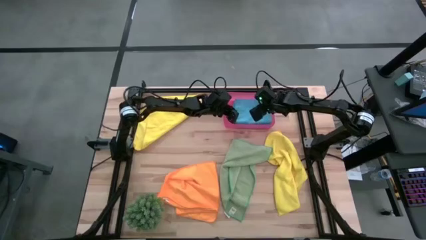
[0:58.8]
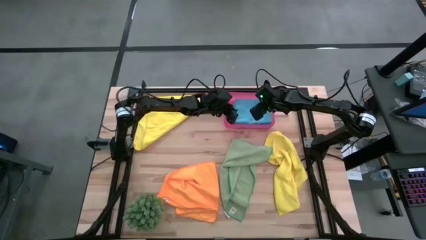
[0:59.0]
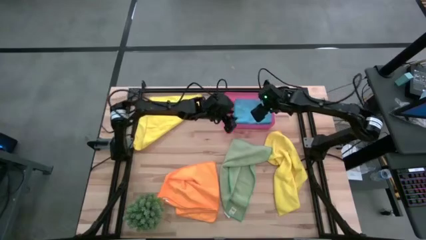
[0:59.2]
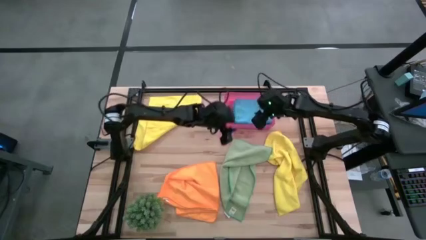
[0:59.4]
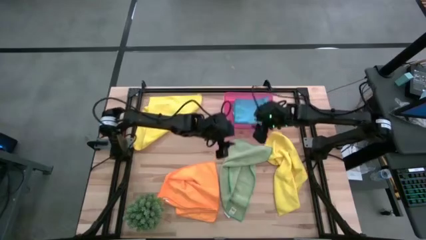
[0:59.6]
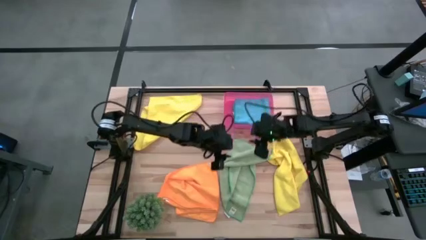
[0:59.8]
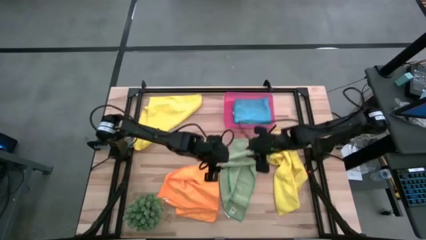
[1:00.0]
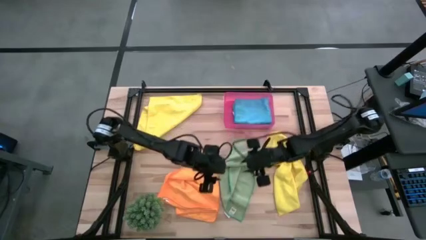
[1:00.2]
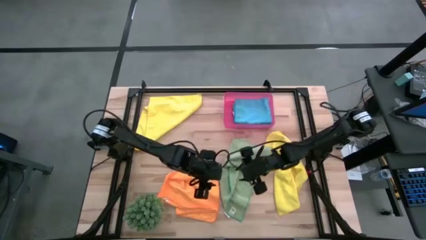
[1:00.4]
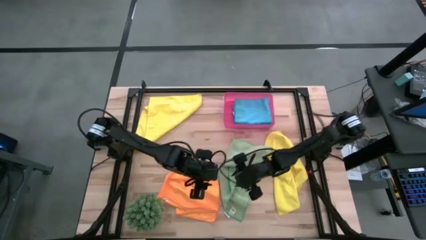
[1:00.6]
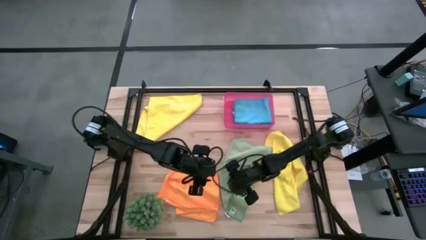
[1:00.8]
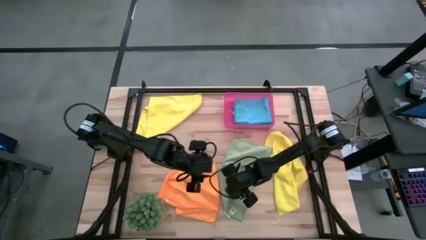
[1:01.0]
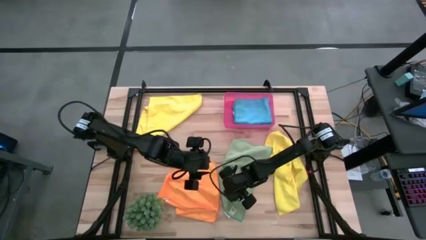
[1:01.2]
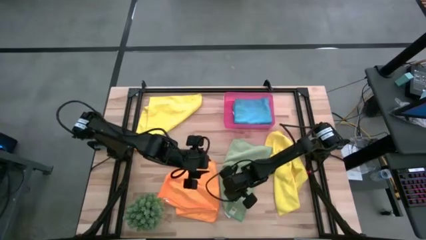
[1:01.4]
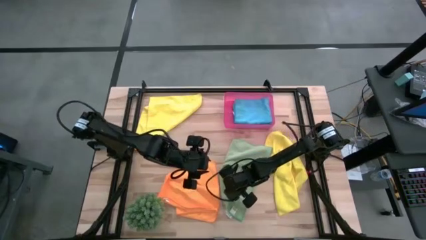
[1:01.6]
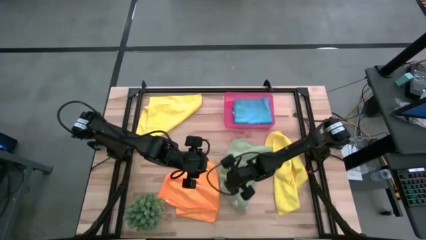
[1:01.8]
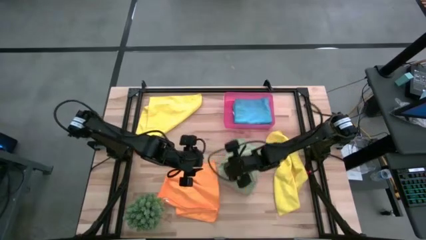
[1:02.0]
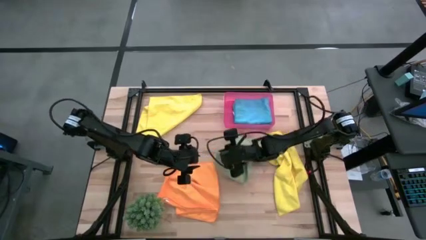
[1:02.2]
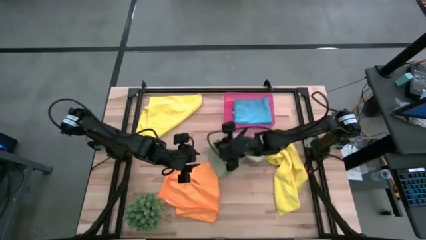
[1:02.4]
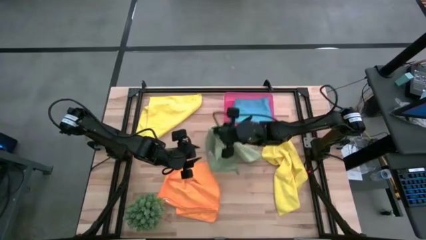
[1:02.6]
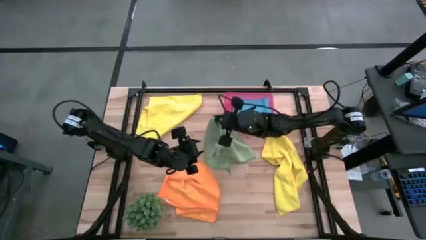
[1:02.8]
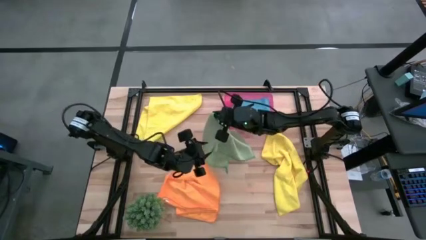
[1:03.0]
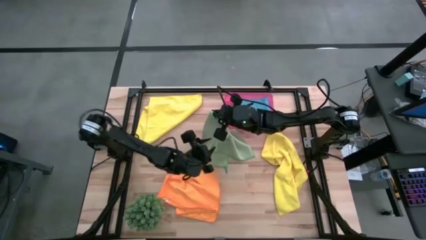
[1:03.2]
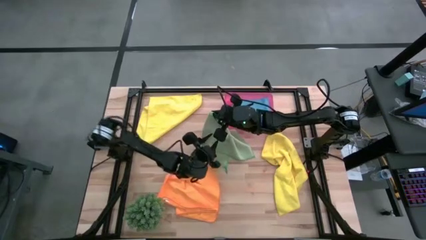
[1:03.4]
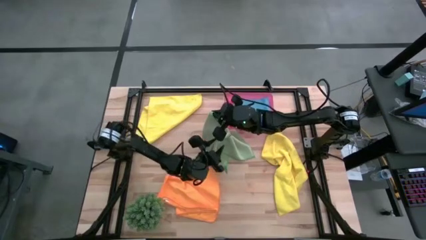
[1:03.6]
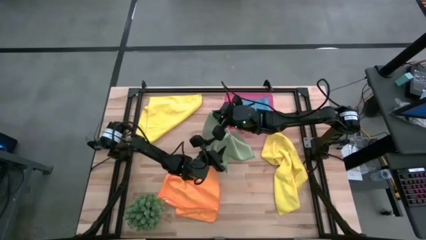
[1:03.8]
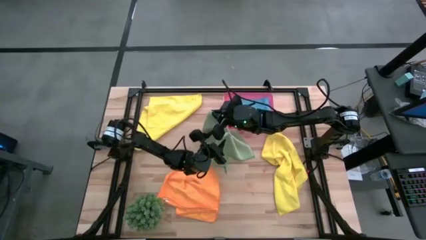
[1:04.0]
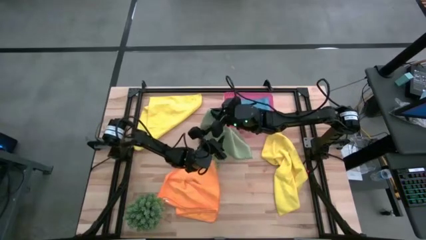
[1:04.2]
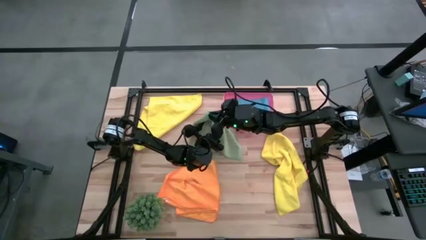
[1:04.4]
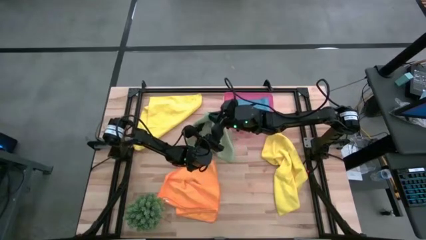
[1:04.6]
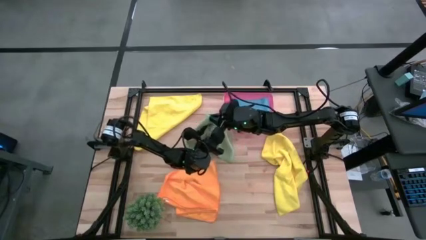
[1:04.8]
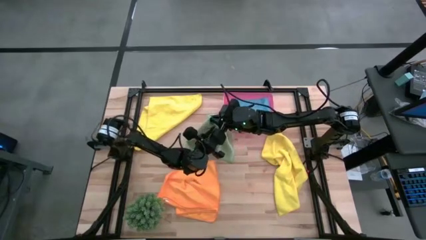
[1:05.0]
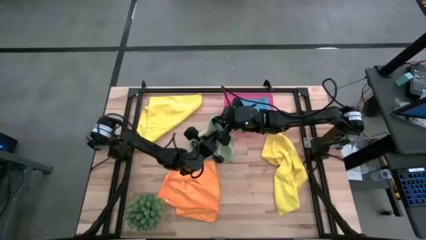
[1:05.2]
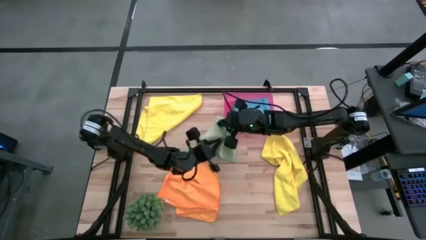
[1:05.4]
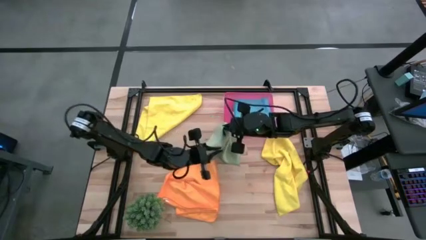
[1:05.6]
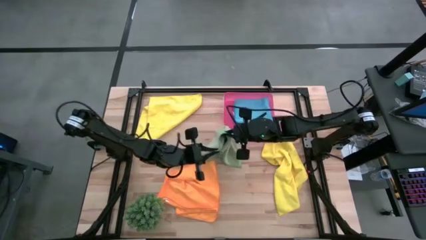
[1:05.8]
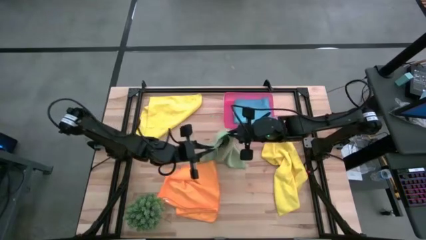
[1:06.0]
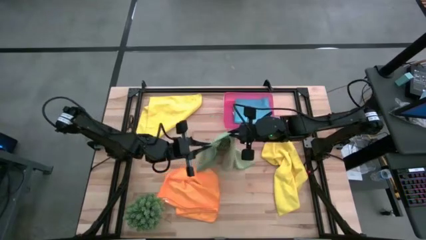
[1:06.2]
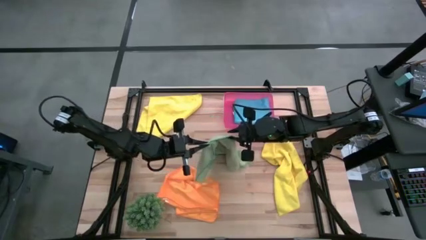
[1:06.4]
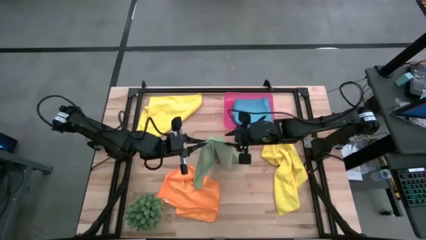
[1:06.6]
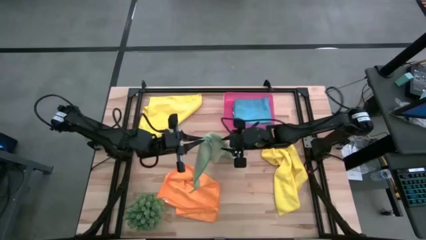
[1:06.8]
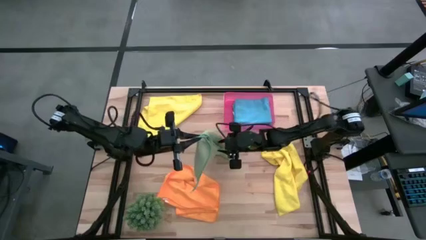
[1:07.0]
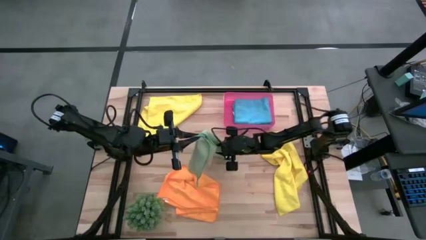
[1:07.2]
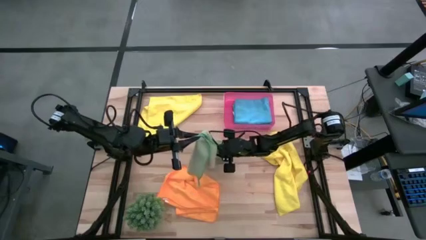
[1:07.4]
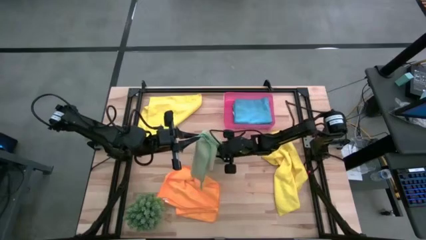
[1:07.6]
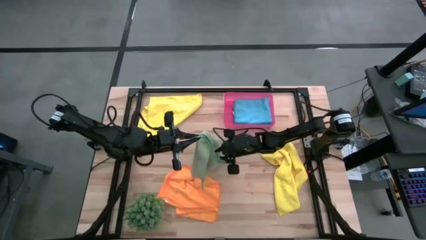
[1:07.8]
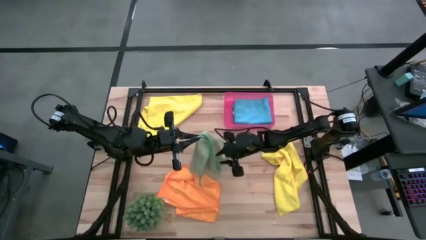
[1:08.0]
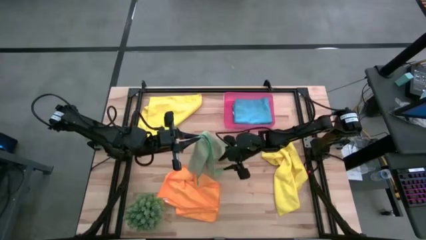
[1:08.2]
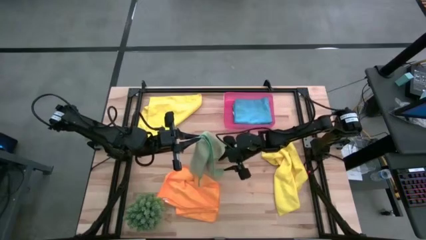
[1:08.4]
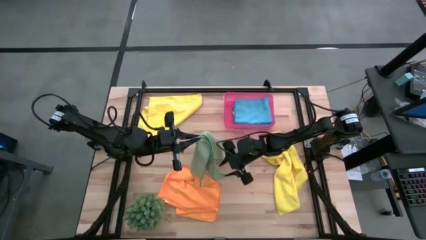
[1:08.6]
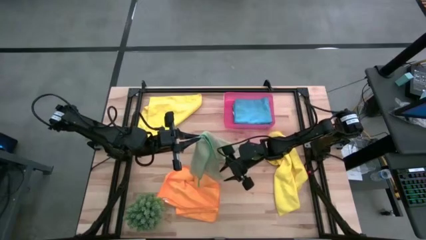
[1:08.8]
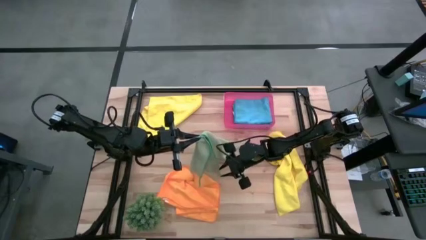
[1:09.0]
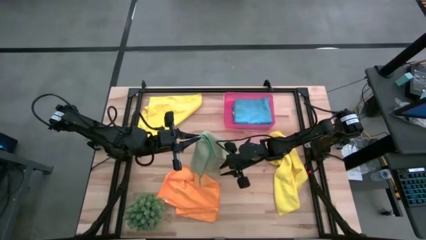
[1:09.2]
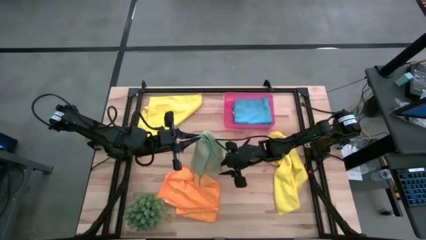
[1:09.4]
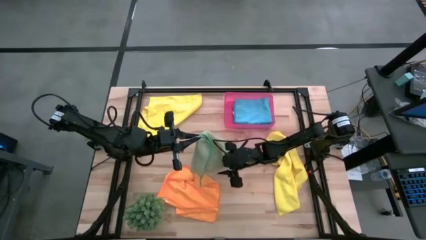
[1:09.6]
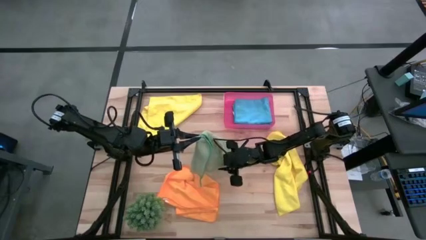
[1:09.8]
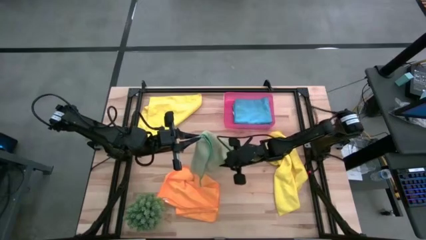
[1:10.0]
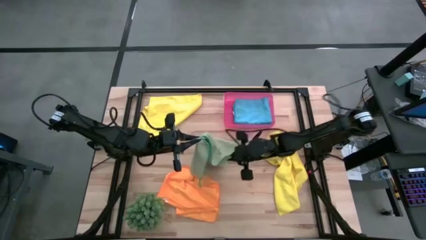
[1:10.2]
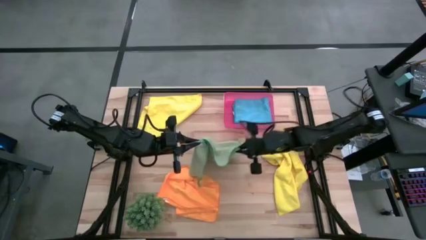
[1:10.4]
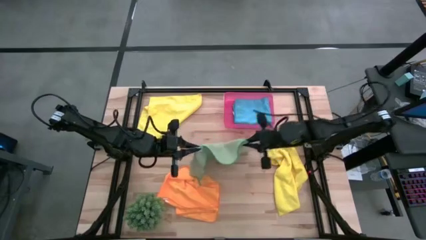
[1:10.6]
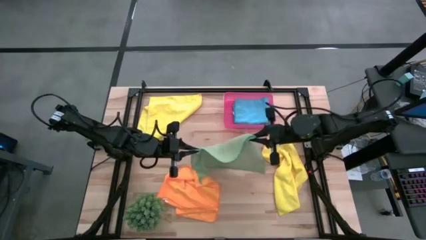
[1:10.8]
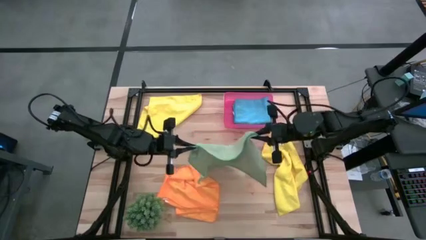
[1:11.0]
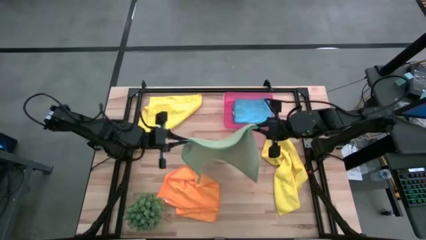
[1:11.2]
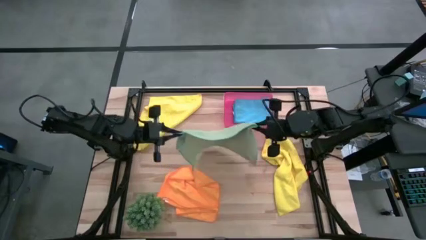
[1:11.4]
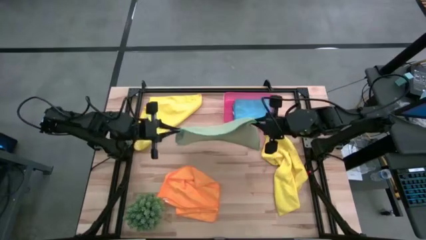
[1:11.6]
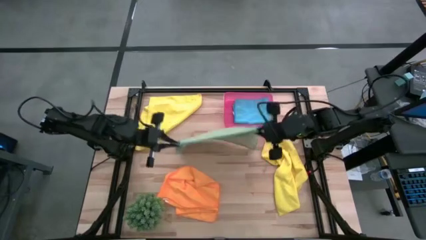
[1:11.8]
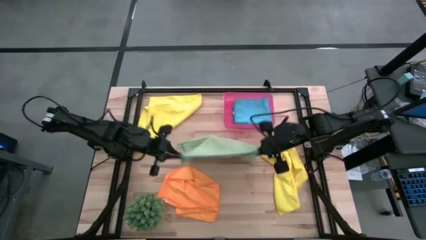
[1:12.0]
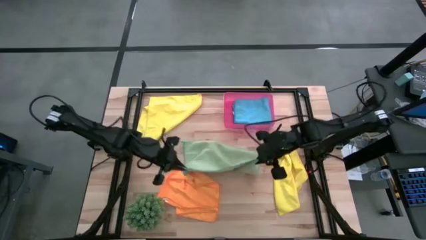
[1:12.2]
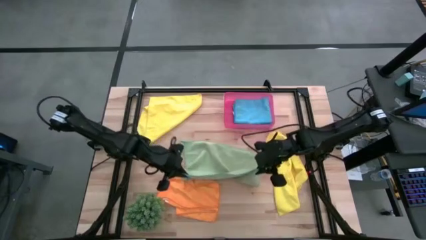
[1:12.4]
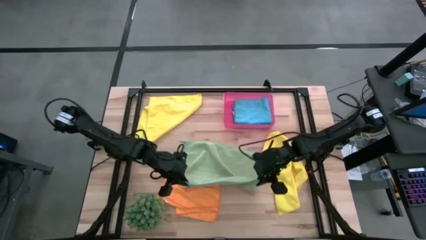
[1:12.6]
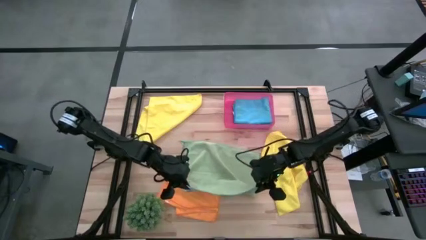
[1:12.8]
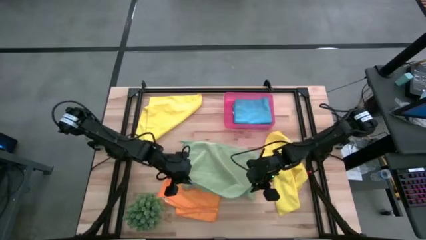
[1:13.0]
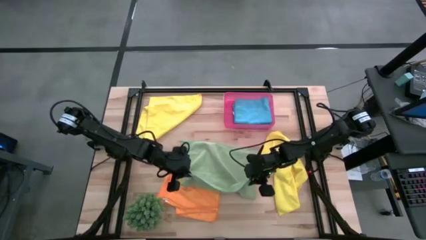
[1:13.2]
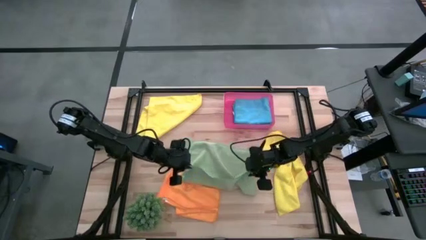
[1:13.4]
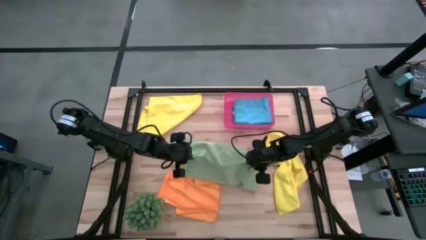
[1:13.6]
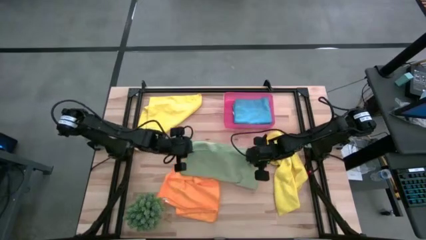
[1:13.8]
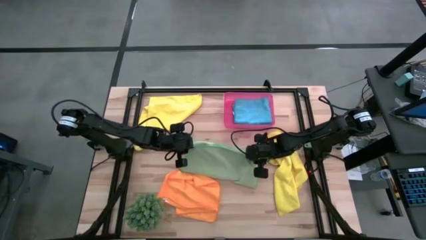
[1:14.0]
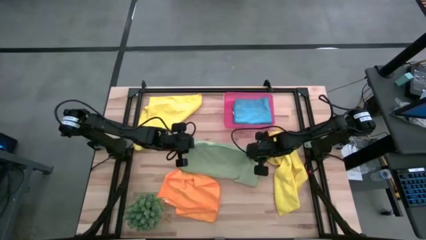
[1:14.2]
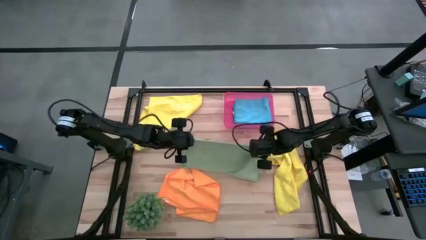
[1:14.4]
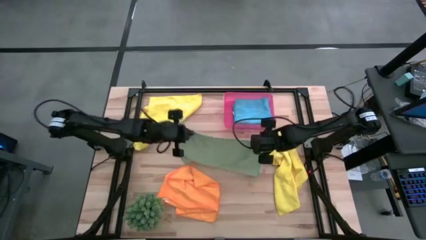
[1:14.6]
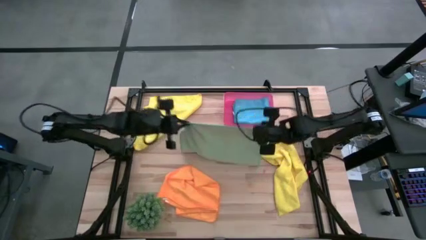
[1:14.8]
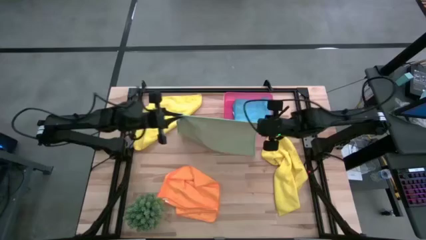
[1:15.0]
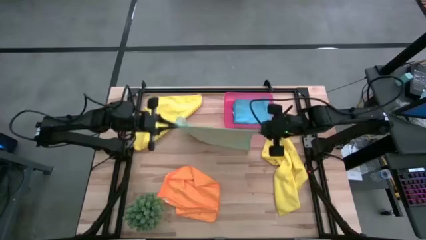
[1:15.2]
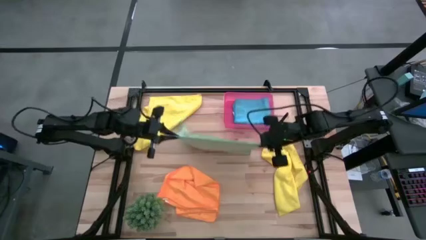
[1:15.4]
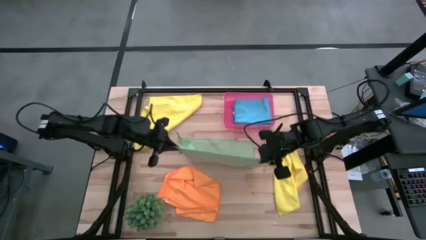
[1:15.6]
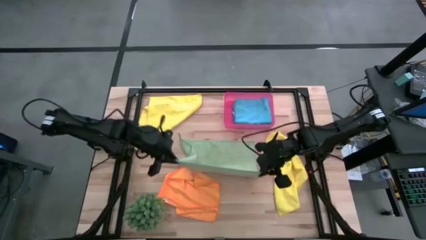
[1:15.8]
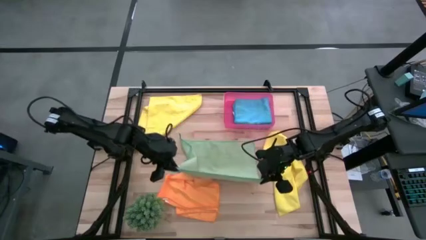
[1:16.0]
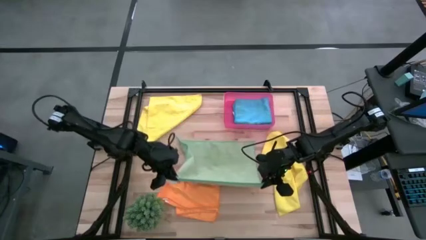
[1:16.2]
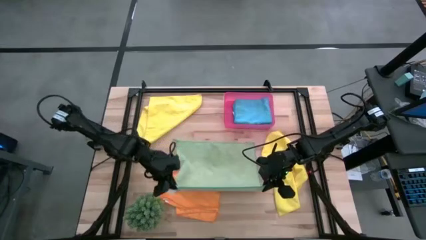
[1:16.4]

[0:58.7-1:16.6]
Task: Fold microfiber towels
Fold the green microfiber cloth
